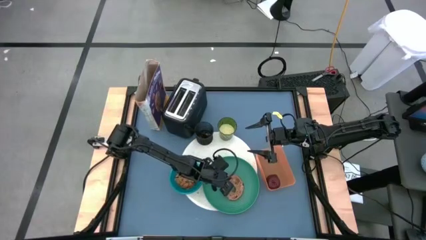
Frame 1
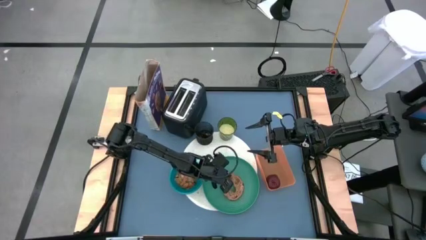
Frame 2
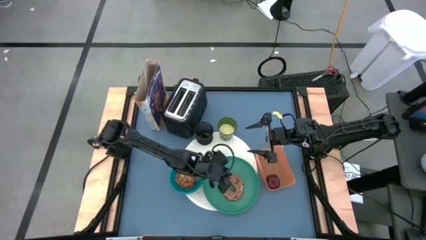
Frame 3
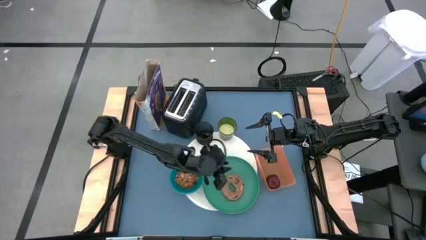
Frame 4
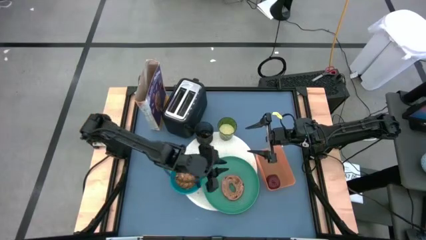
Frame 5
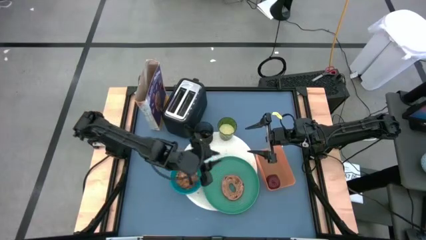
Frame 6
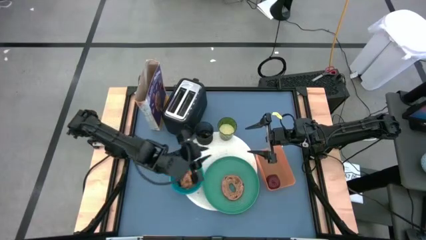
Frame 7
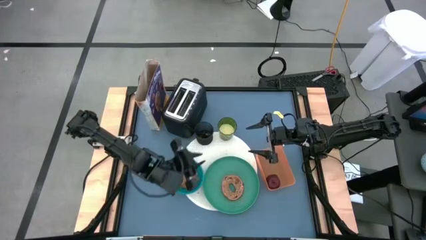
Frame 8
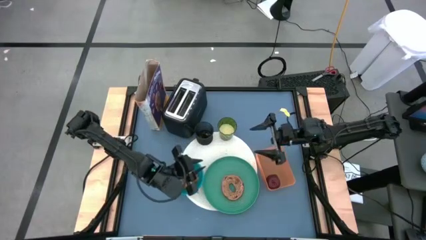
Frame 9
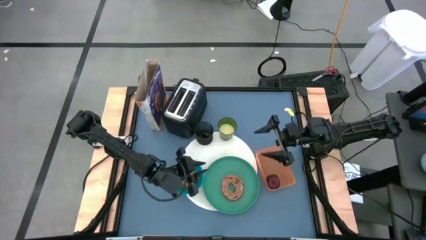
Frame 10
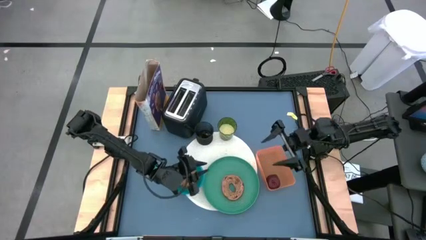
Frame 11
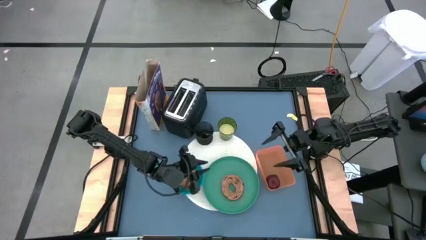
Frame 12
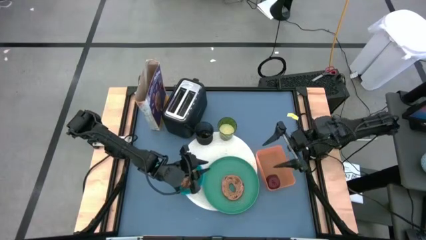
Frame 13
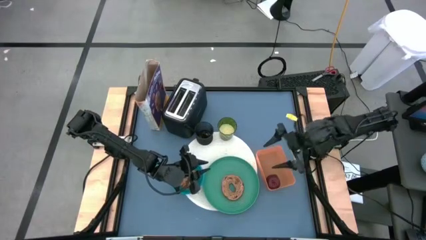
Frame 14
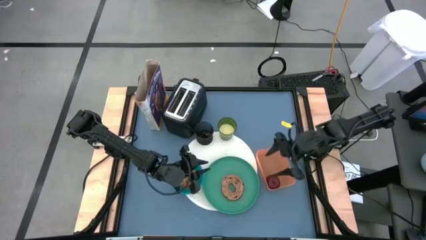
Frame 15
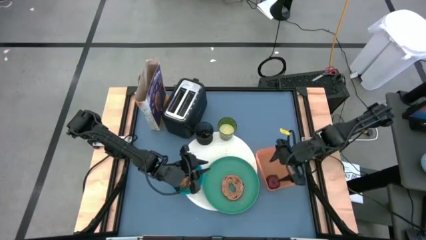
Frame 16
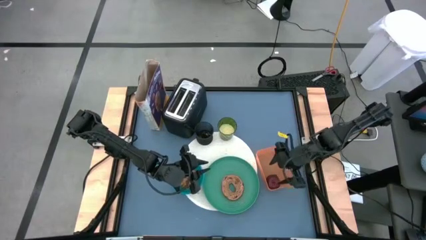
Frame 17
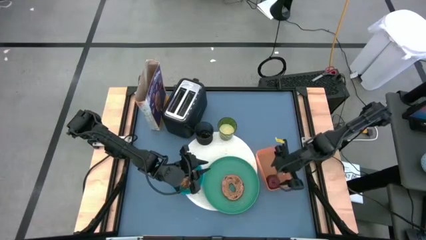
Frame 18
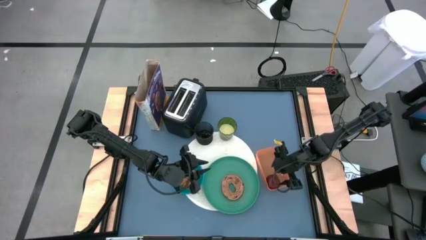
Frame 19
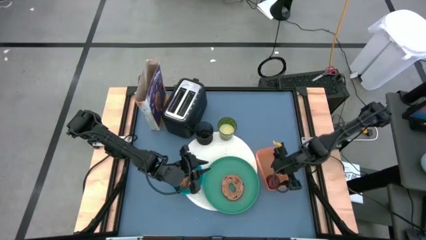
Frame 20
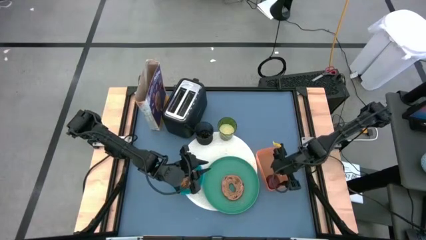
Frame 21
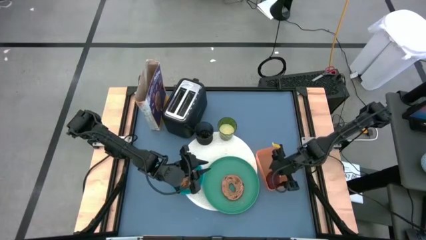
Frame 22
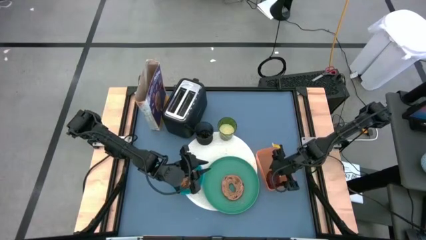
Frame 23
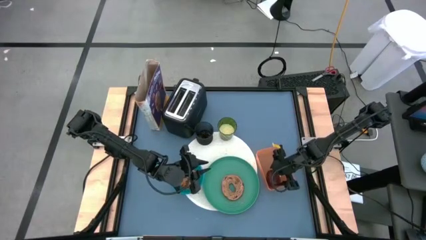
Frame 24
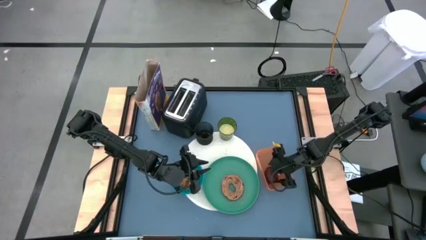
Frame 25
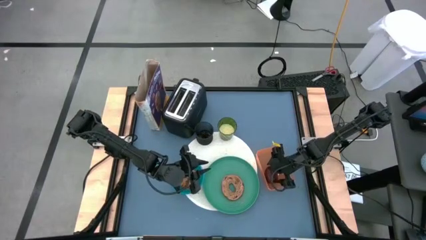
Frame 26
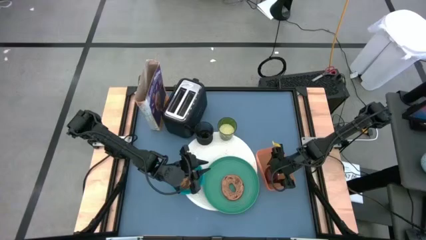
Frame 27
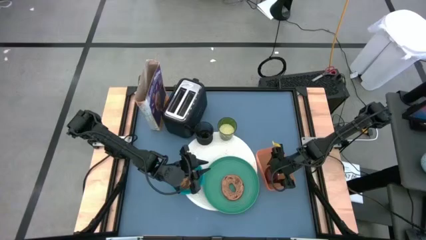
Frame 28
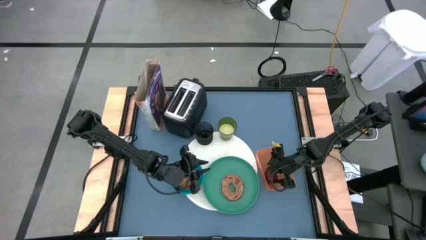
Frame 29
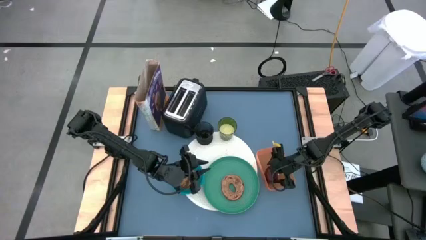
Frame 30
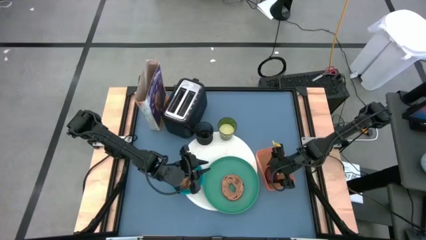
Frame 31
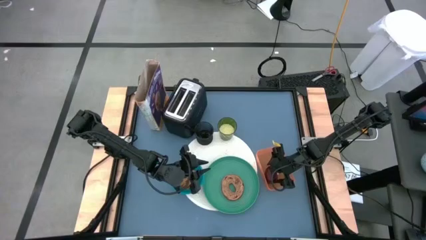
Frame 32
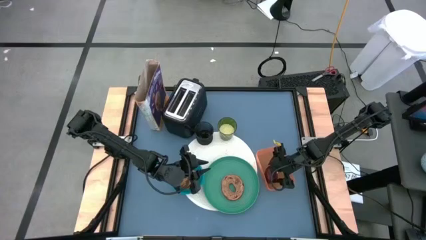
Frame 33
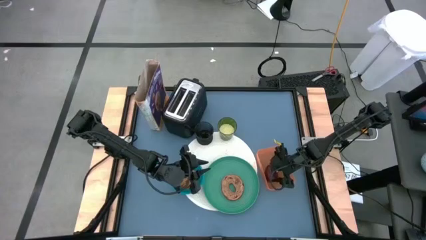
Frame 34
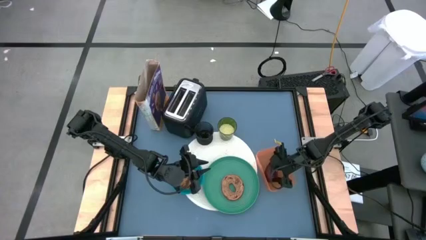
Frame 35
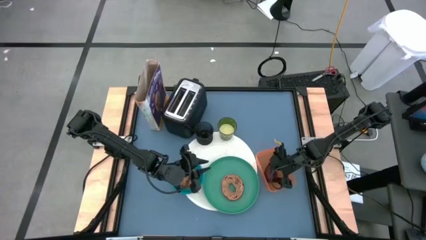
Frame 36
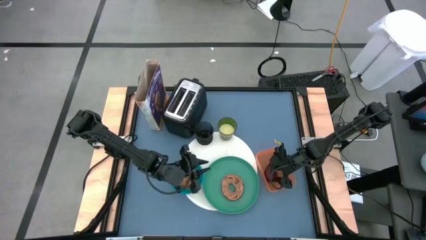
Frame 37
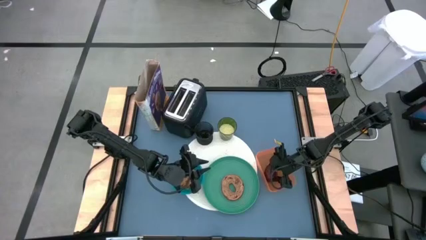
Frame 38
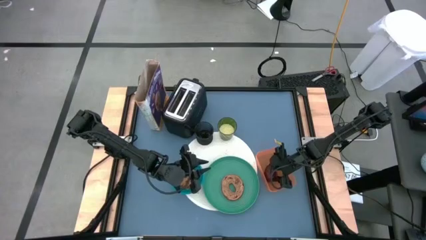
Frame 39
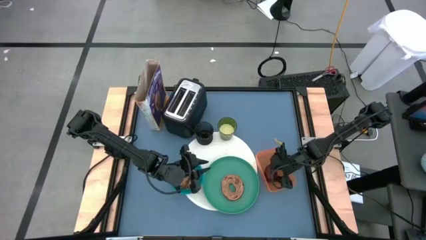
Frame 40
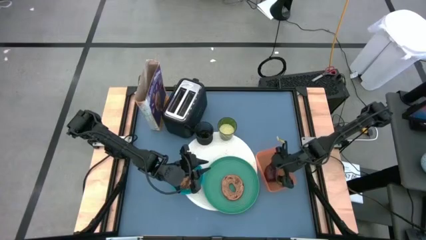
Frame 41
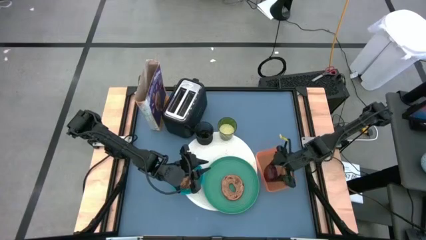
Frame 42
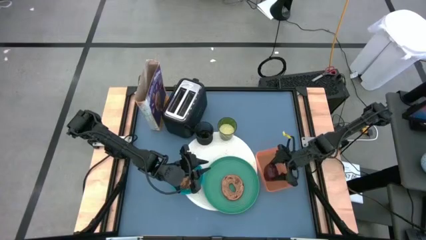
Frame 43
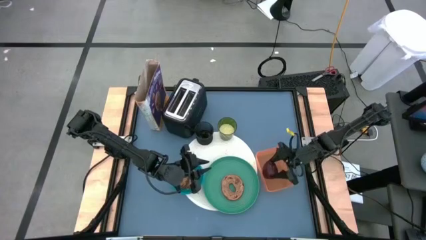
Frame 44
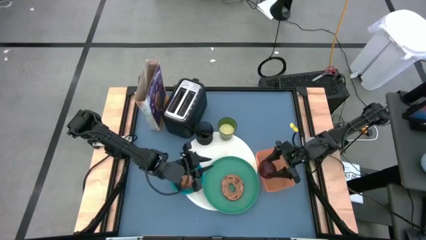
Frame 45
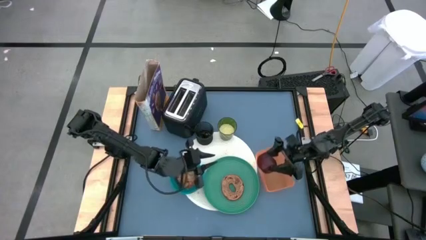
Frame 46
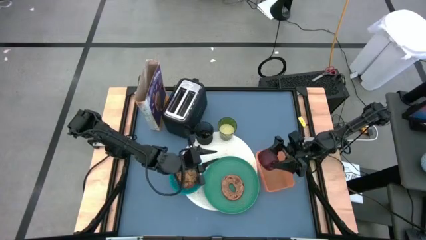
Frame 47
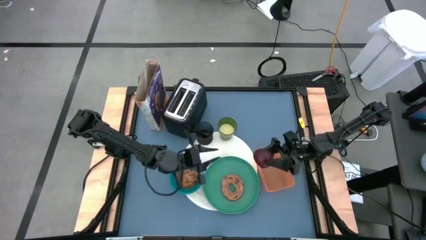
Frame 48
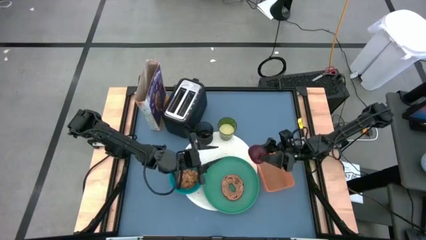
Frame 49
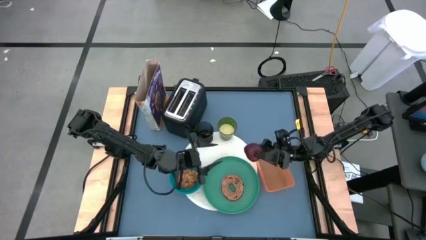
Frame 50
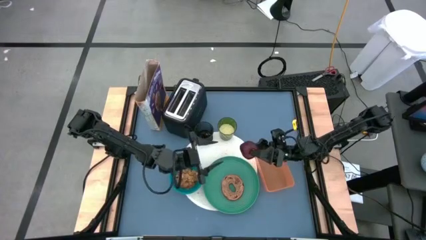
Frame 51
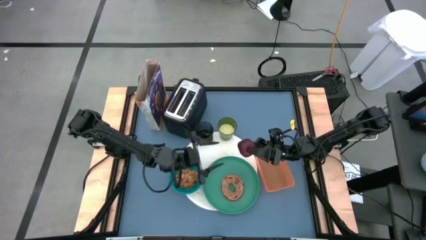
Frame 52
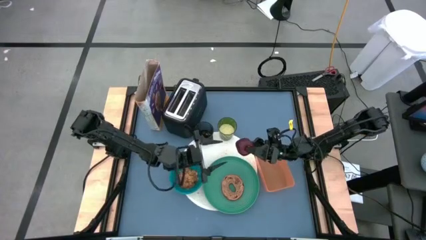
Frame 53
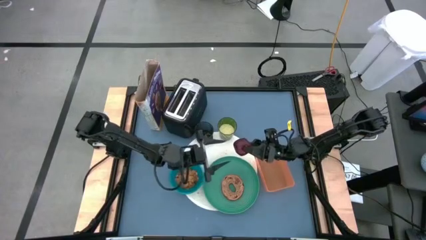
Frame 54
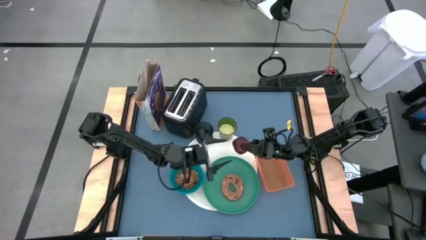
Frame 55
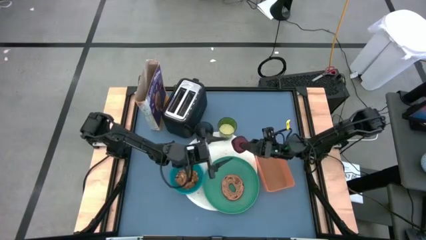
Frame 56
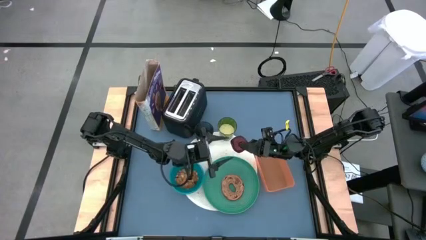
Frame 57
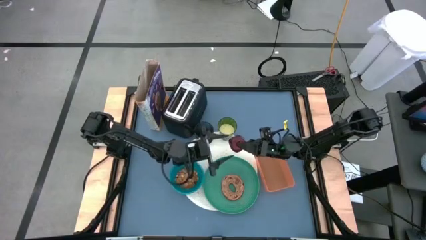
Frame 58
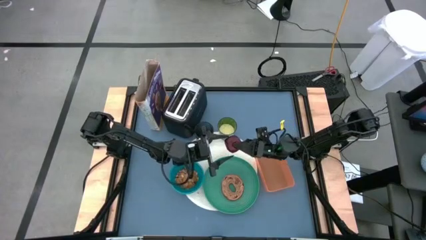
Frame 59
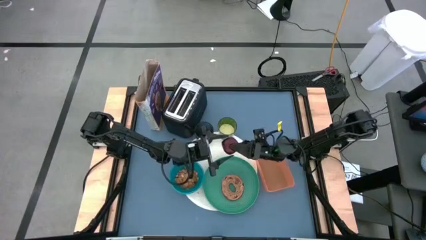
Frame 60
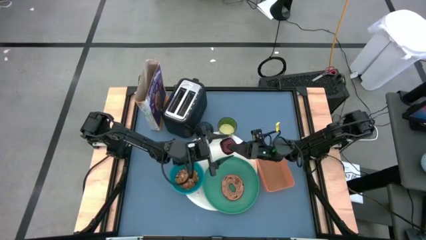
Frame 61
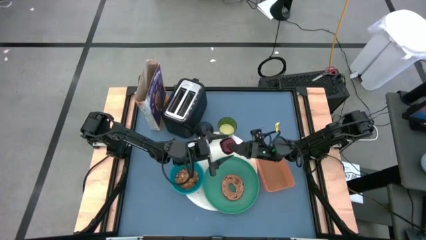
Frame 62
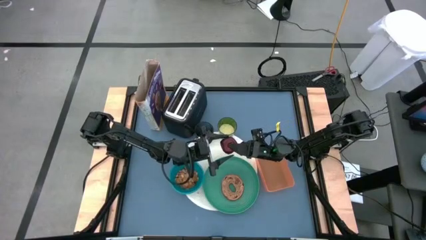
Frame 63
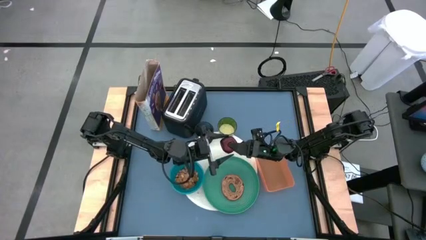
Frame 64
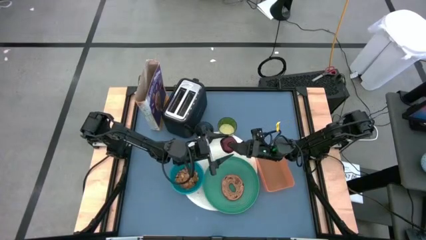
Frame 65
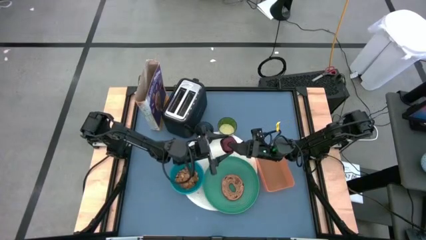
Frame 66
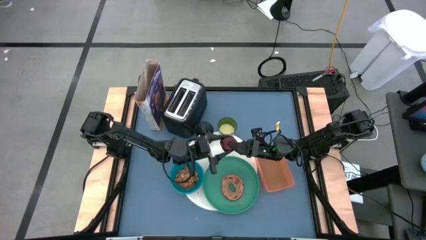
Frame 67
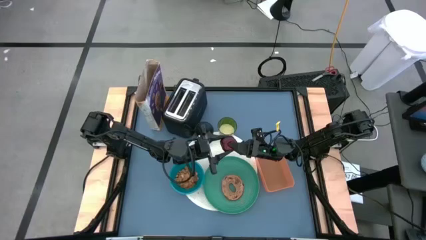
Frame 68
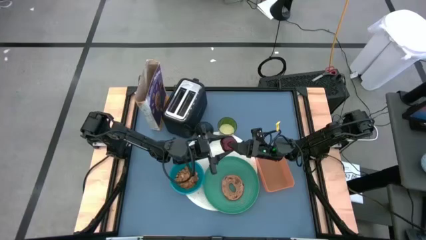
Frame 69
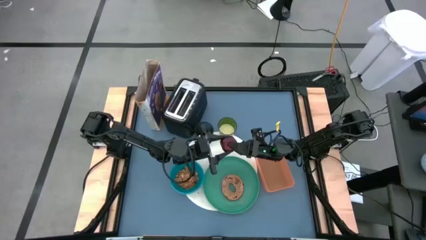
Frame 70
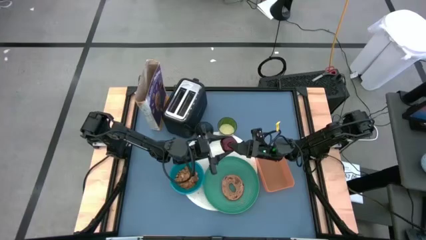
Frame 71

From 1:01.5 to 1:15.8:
Task: Arrange a breakfast setting
Put the red apple on the white mat
